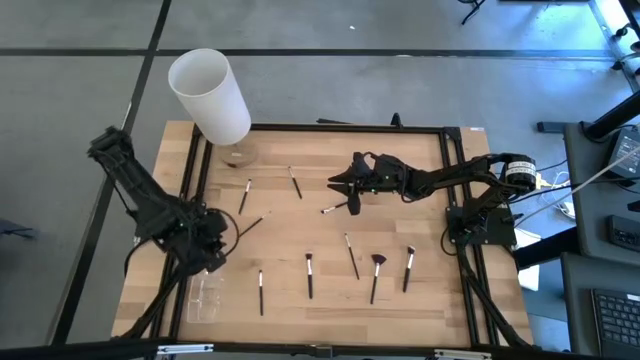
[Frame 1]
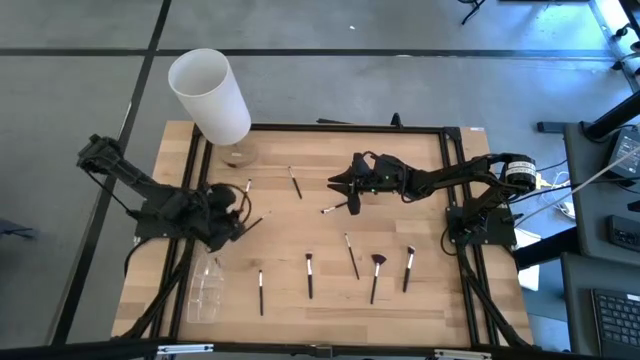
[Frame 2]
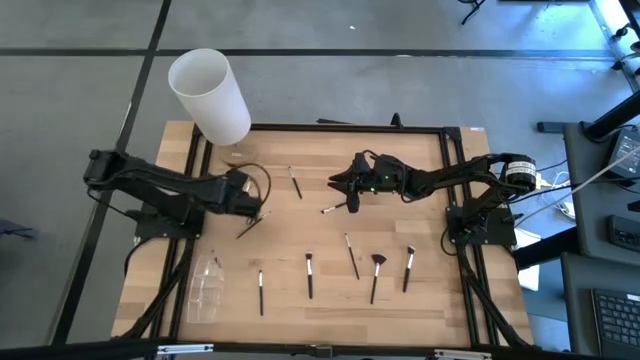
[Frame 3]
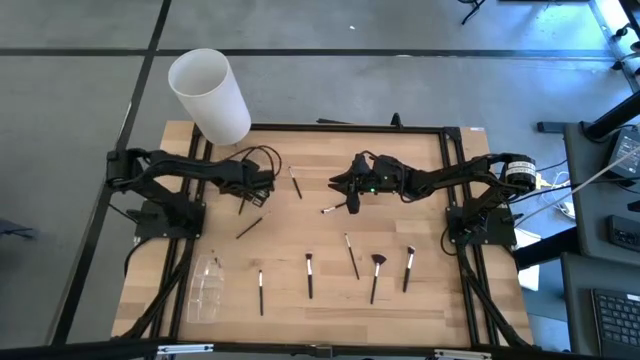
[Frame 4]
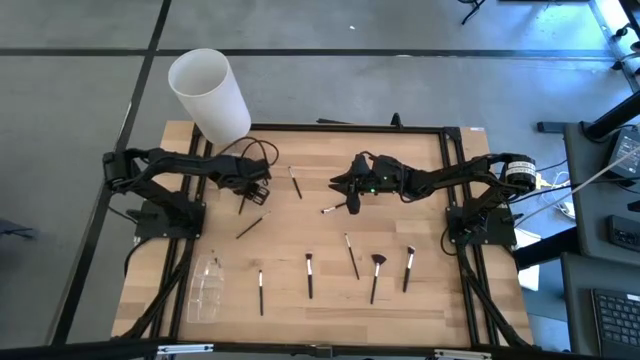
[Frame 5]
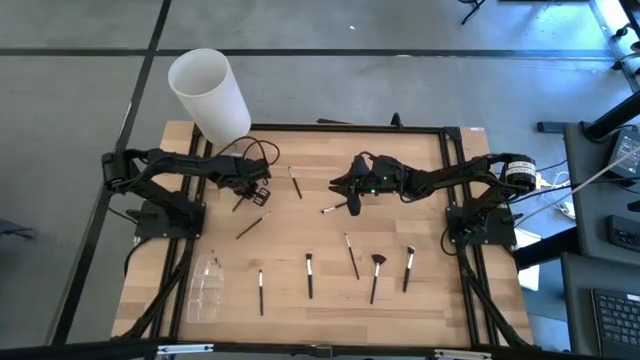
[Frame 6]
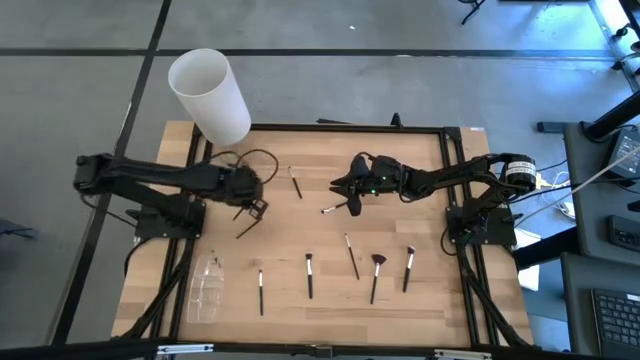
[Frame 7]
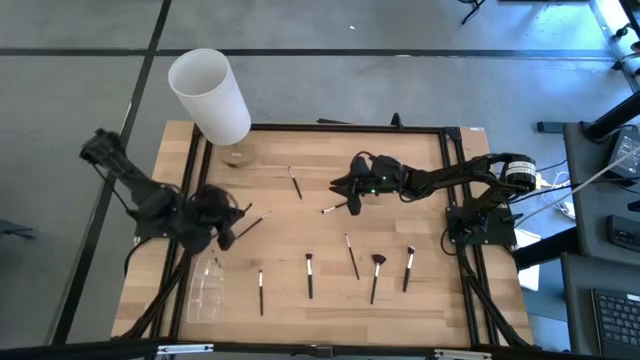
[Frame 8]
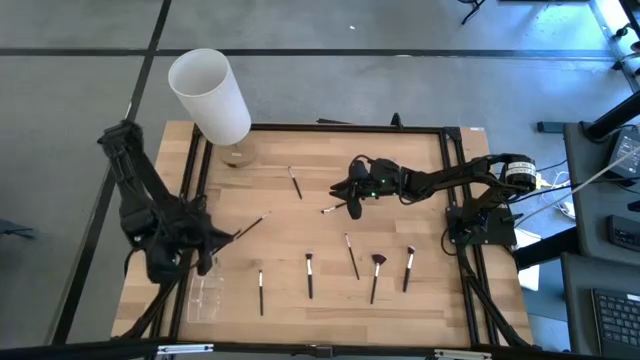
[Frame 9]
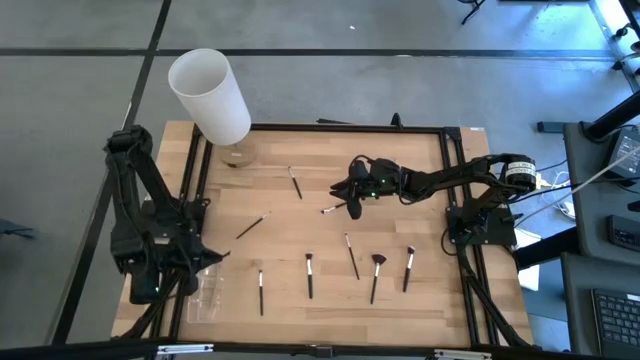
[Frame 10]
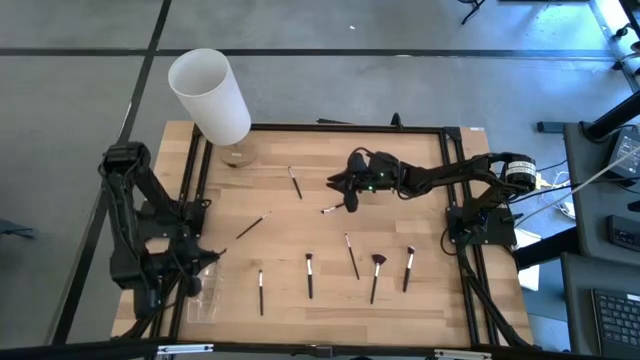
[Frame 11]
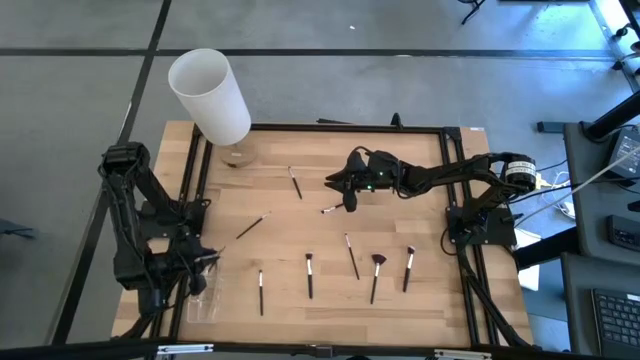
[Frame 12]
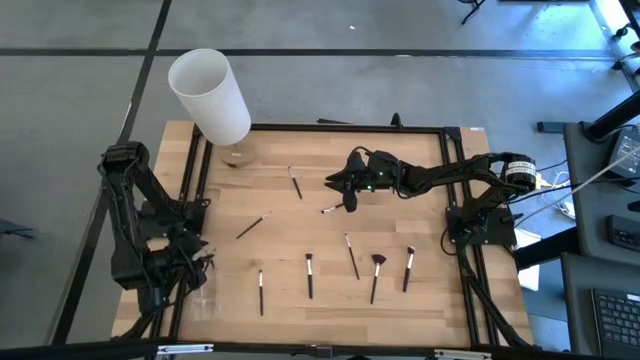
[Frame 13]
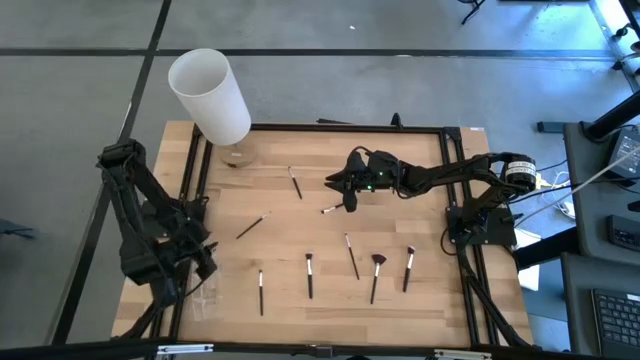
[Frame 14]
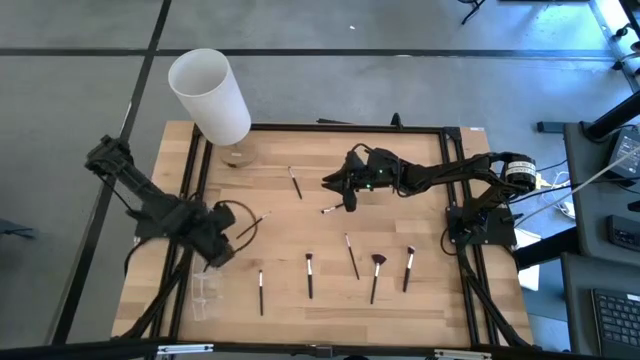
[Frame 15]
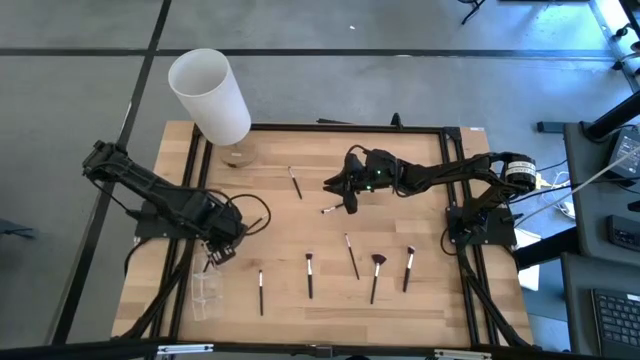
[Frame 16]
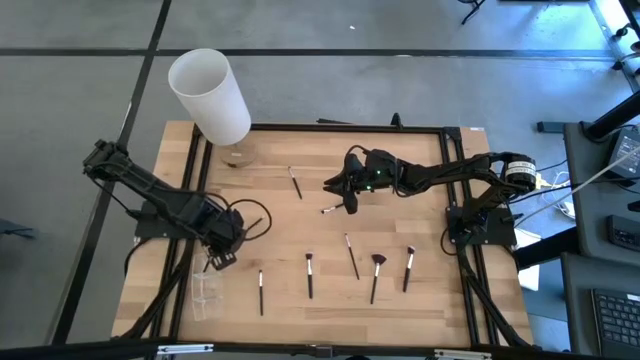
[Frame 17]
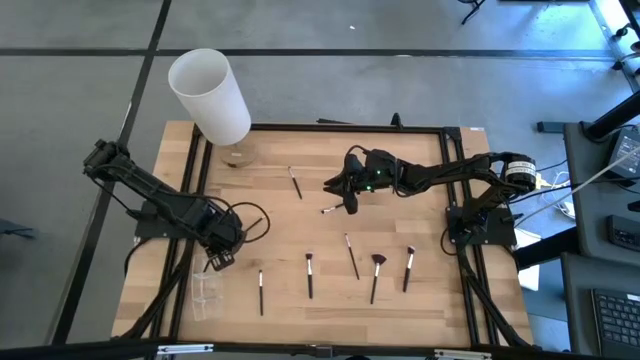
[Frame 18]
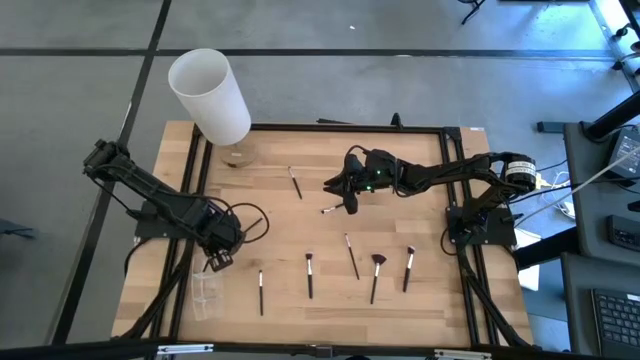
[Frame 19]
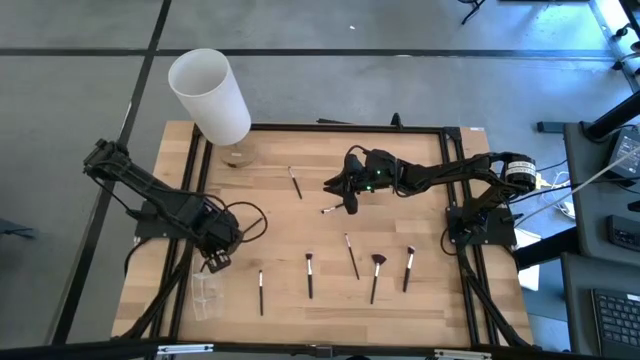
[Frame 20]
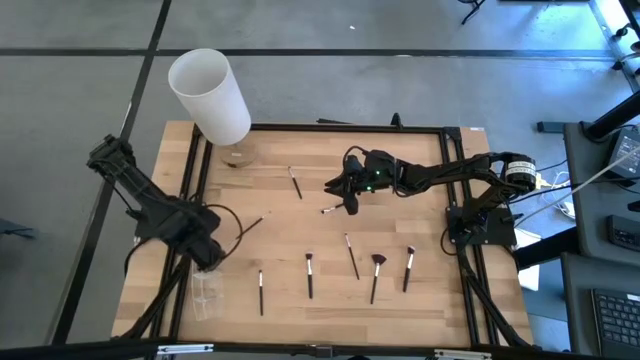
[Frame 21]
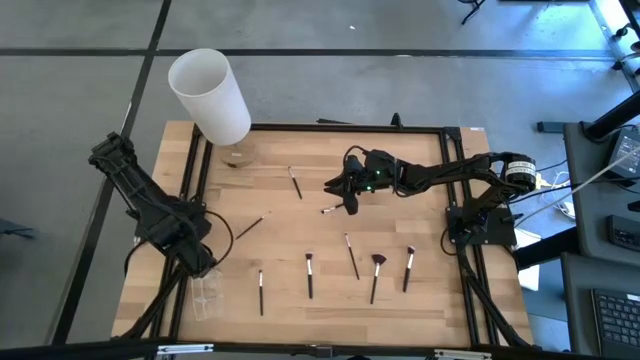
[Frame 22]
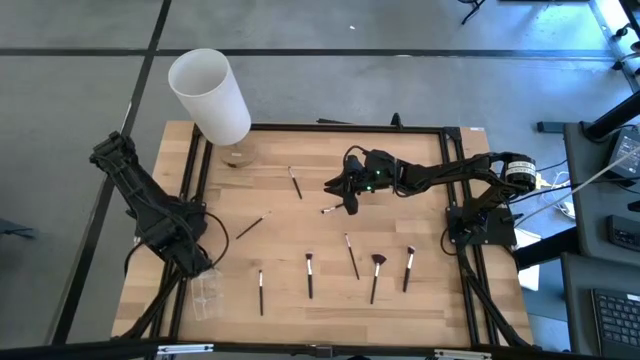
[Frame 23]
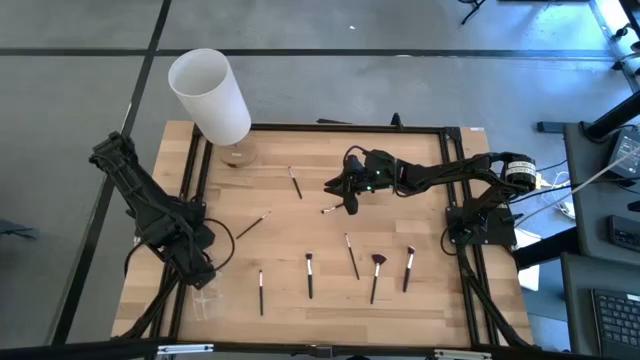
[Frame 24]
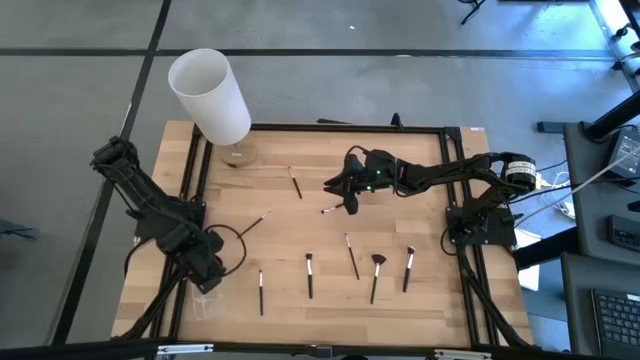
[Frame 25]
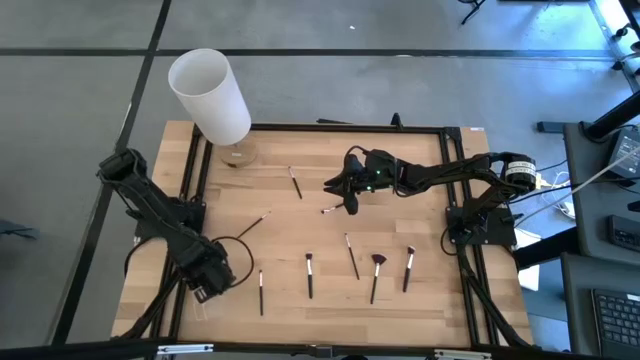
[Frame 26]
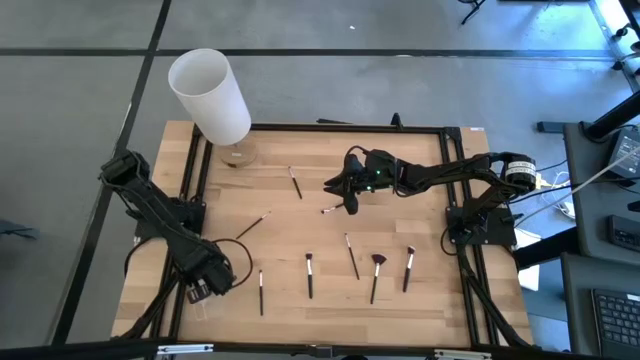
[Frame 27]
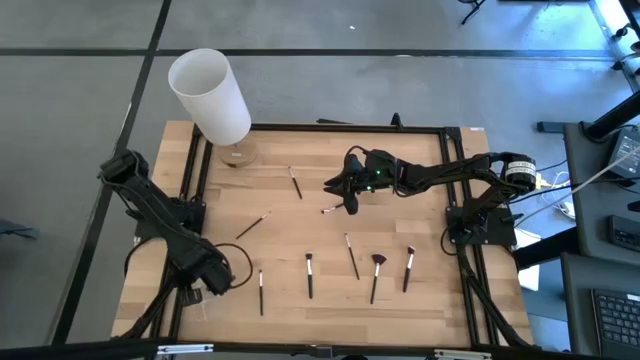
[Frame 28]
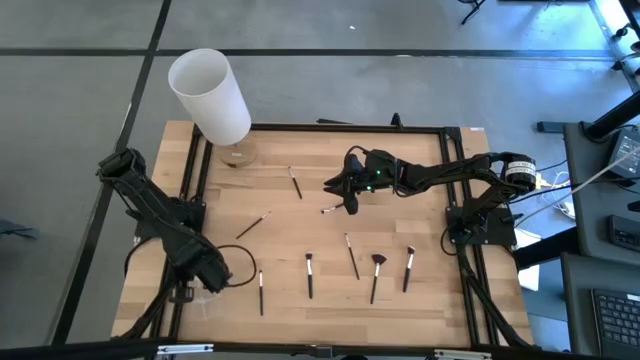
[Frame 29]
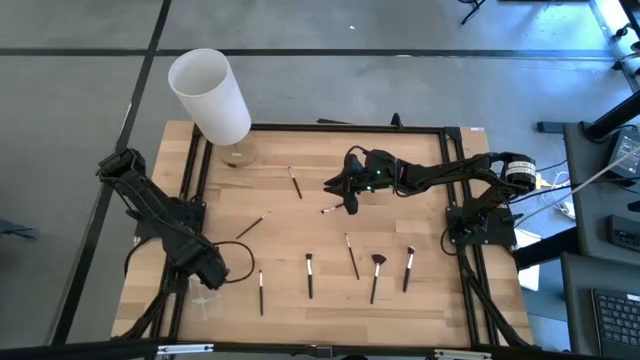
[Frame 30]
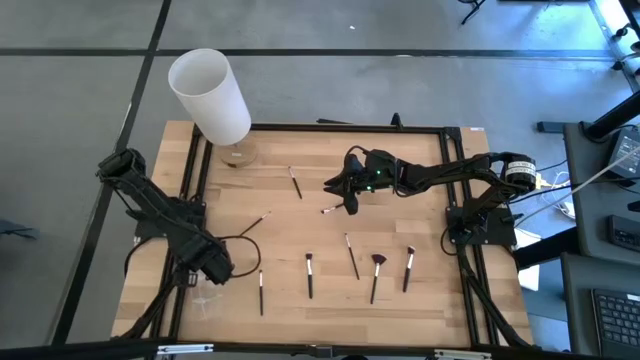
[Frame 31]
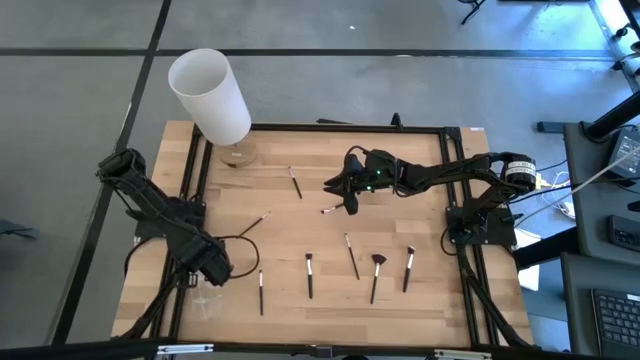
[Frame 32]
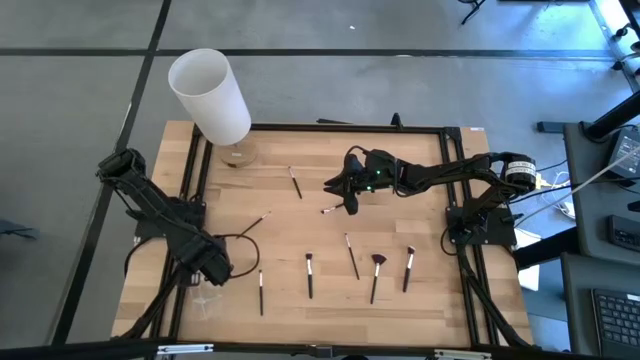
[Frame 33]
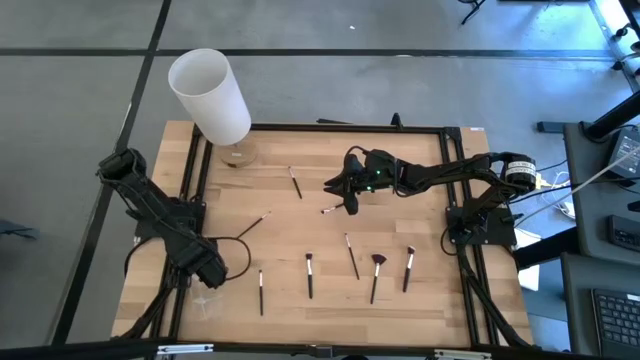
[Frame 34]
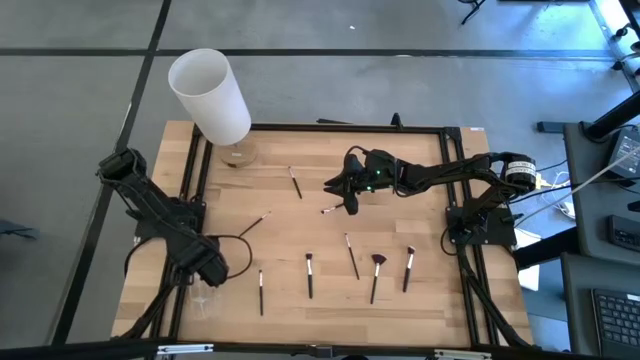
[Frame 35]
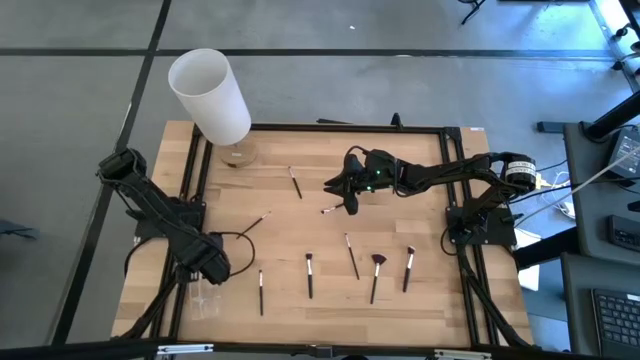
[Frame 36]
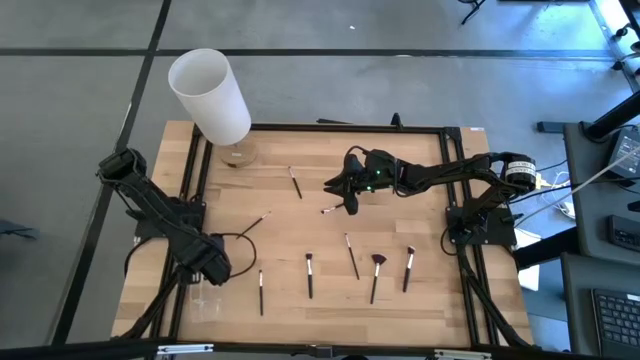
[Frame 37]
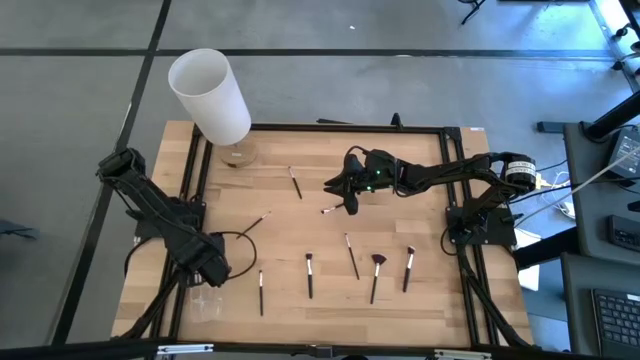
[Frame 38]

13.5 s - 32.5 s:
Task: Put items in baskets/containers
Put the eyeshadow brush into the transparent organizer

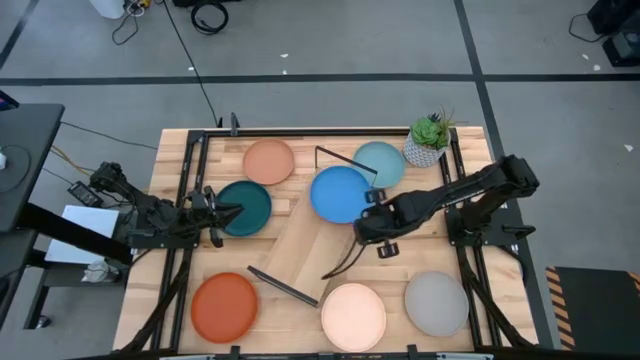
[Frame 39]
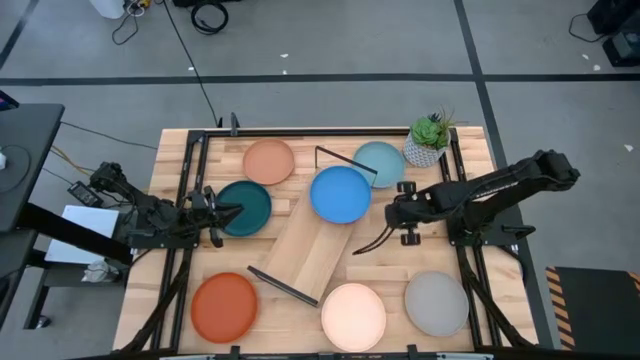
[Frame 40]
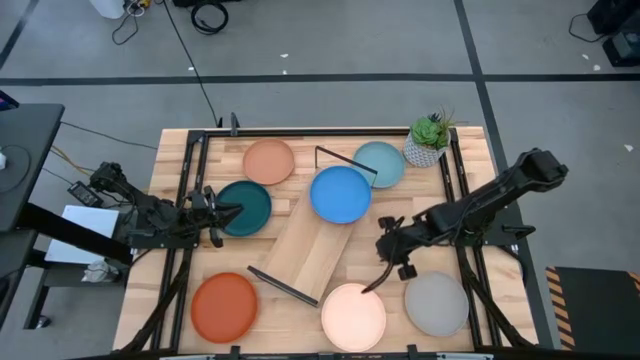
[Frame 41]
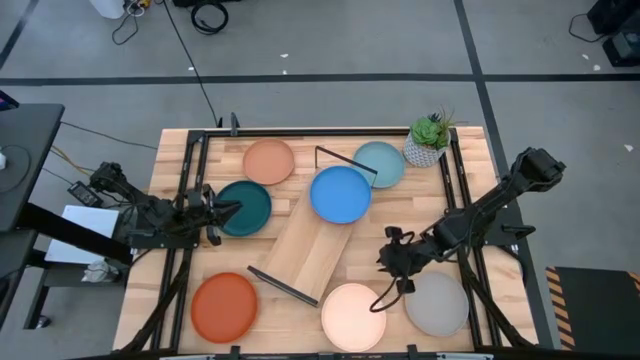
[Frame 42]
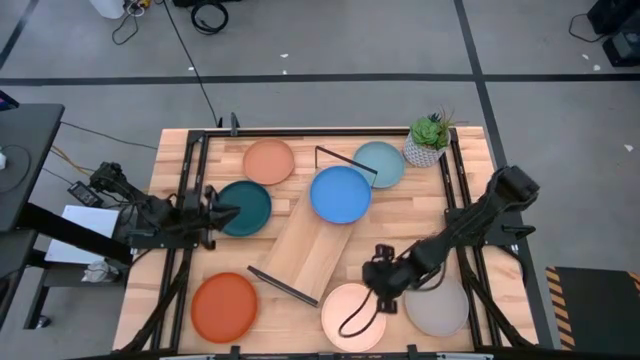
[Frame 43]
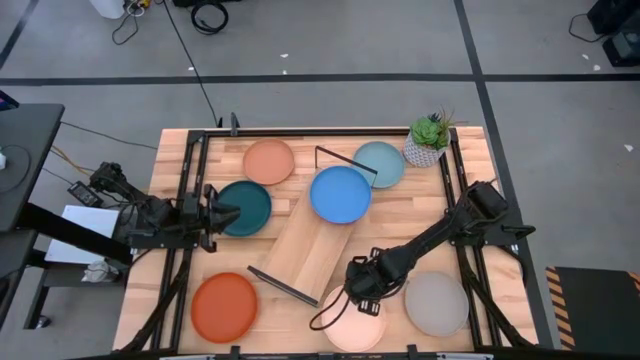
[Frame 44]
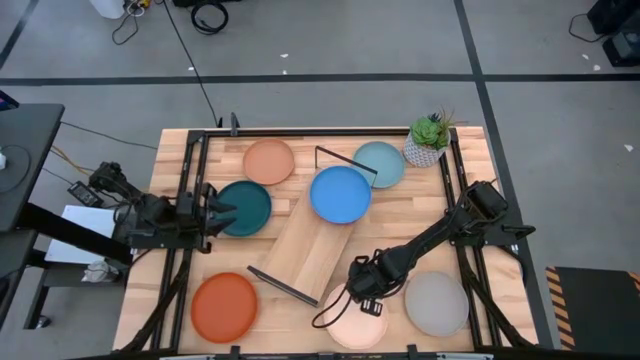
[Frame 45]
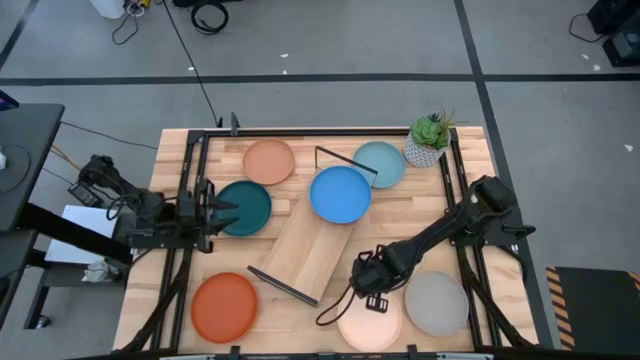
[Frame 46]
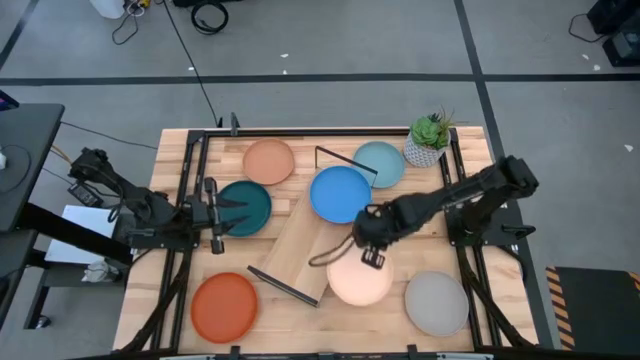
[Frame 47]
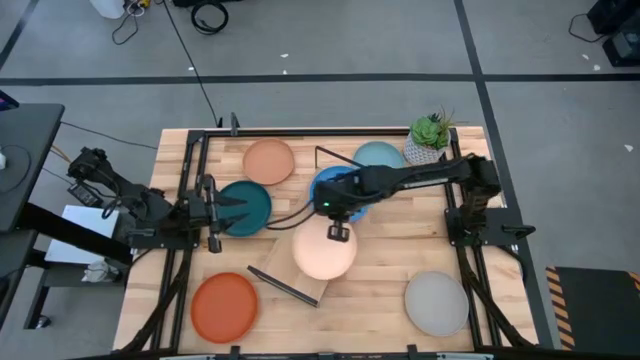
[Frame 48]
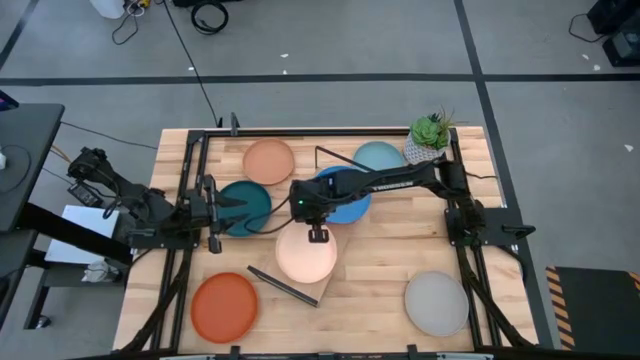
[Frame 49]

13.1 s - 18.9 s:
Task: Place and stack plates onto a shelf
Put the peach plate on the shelf
